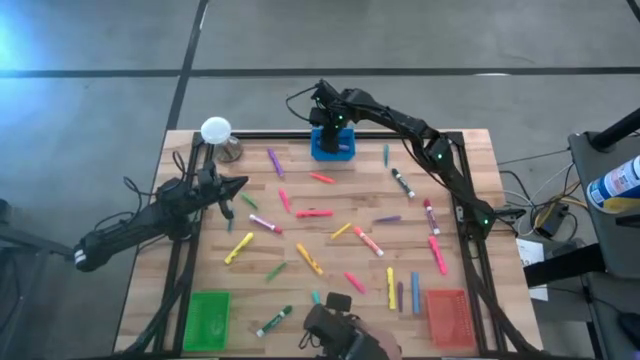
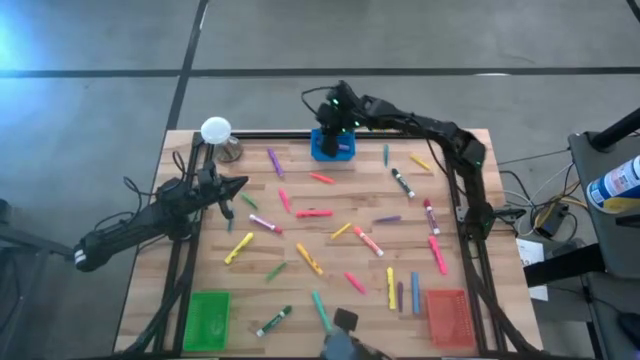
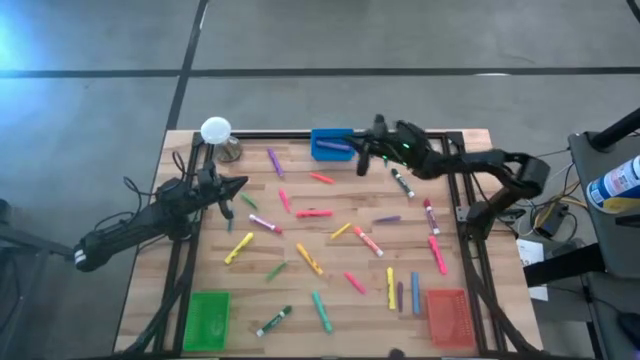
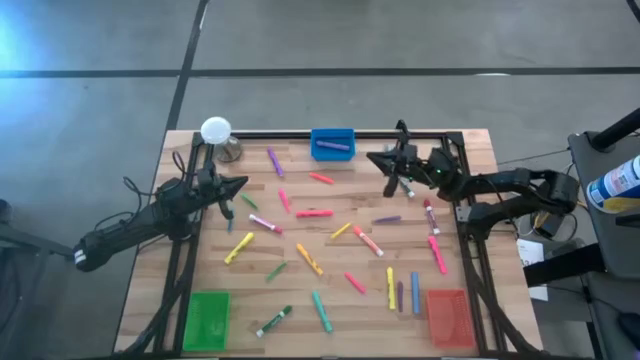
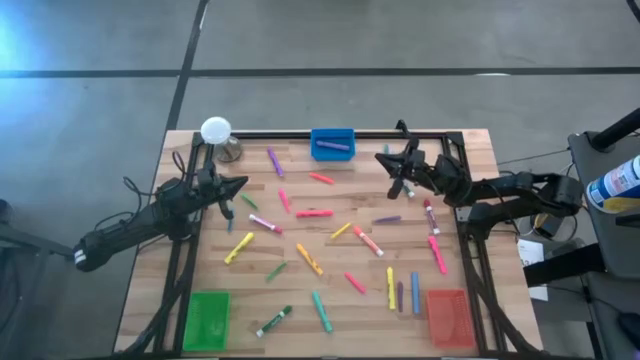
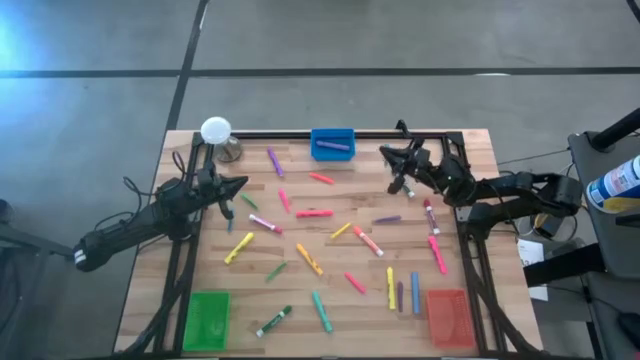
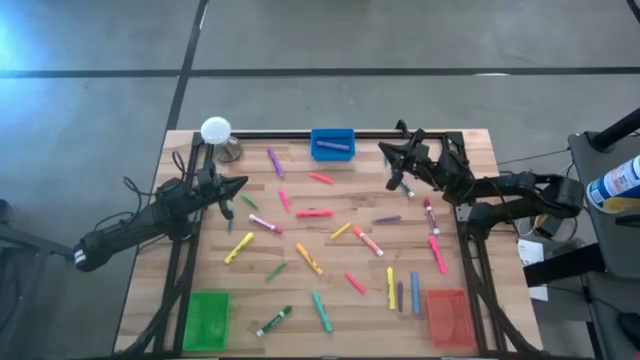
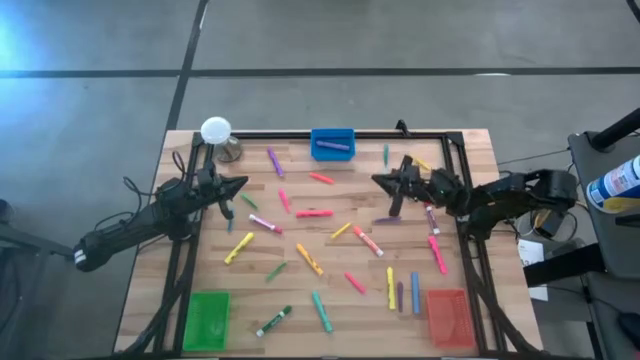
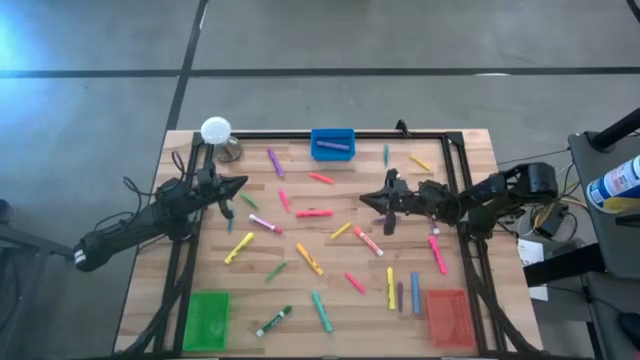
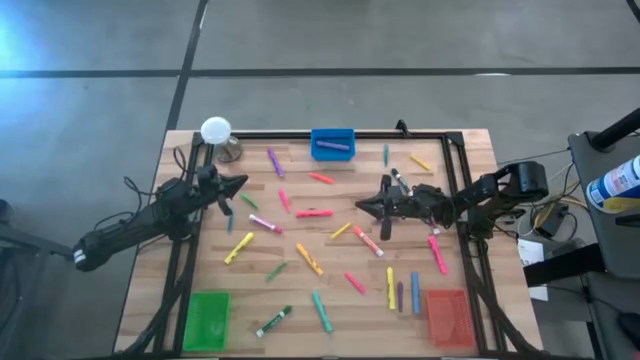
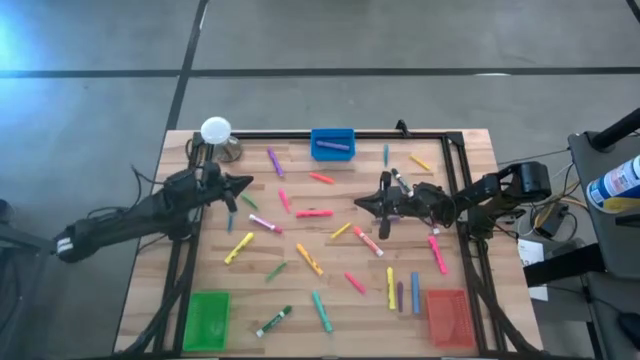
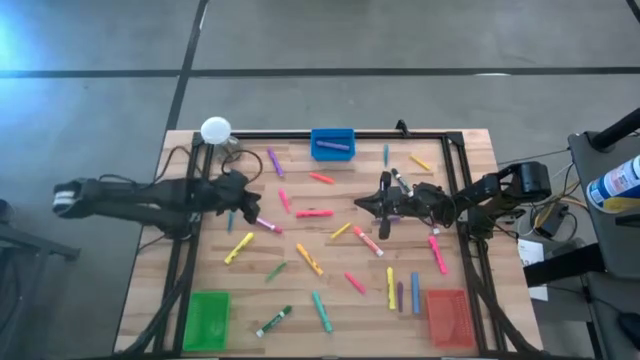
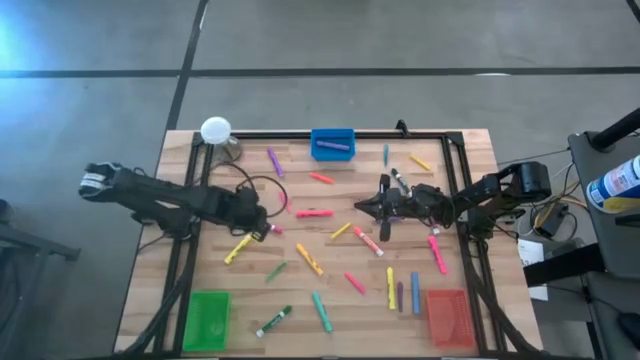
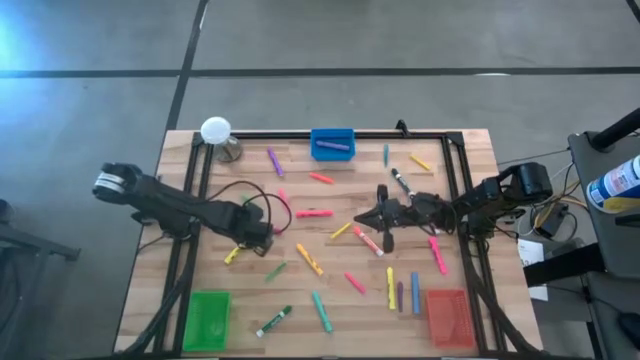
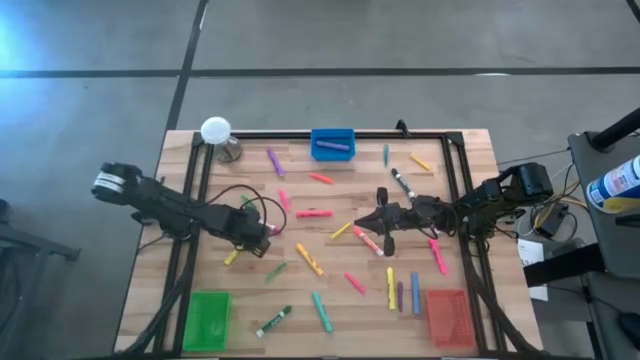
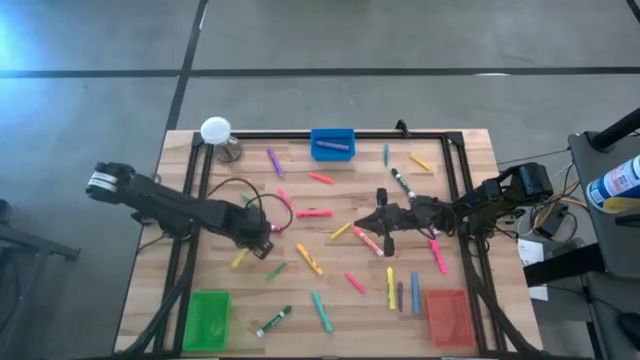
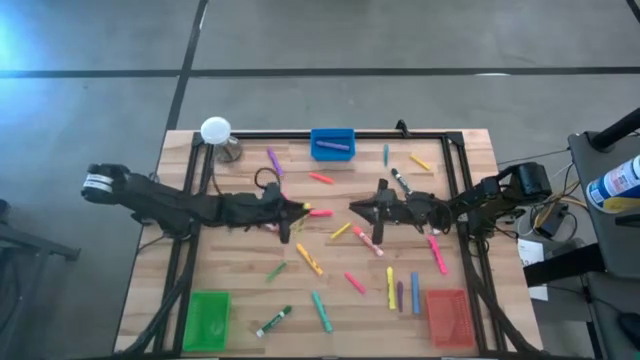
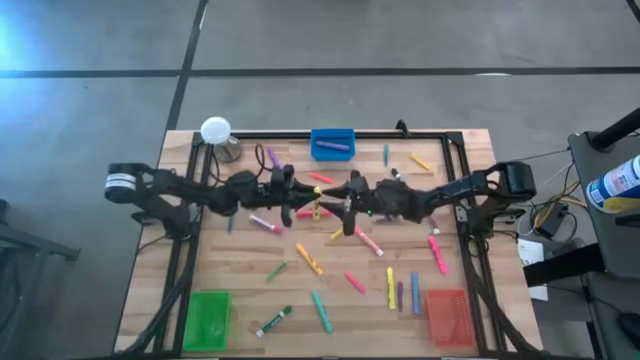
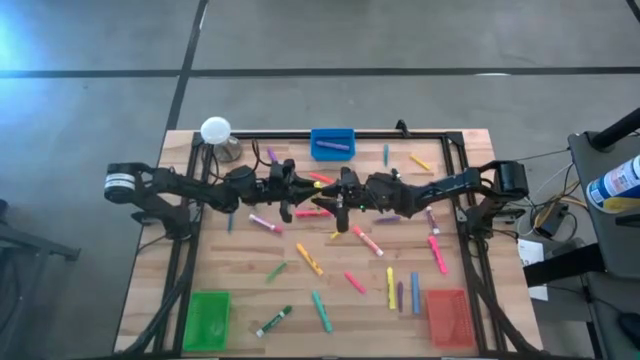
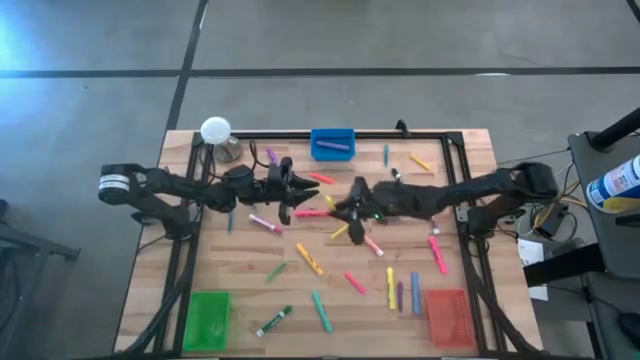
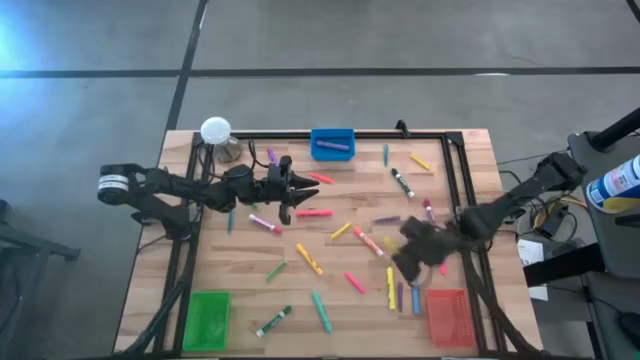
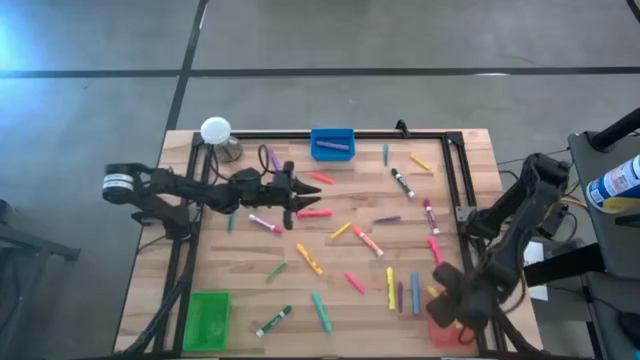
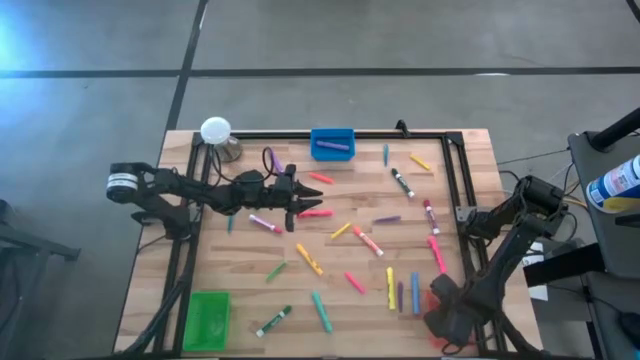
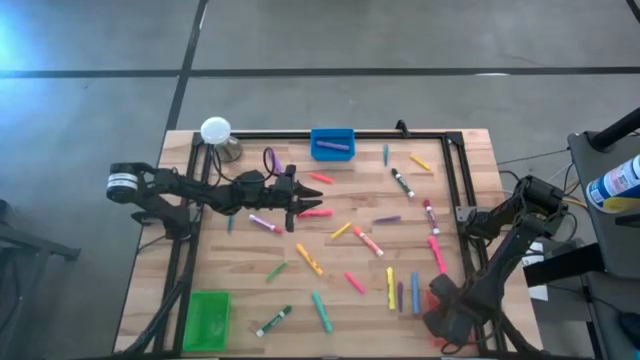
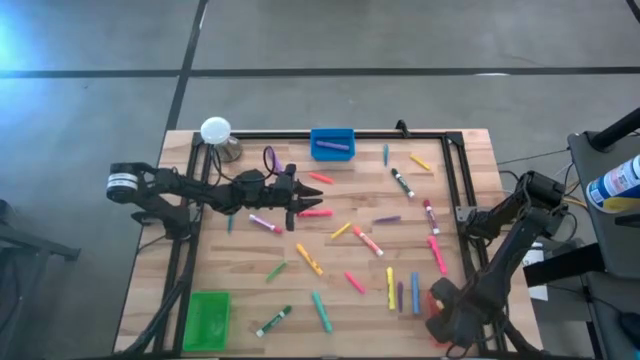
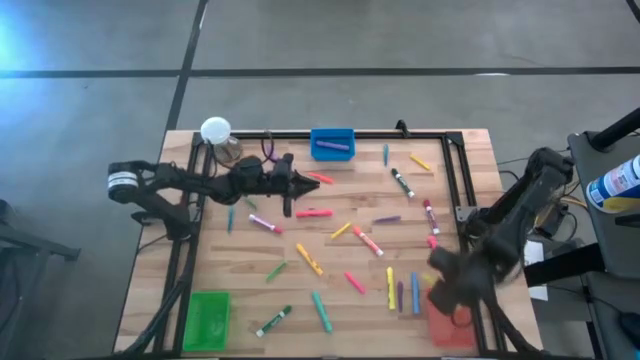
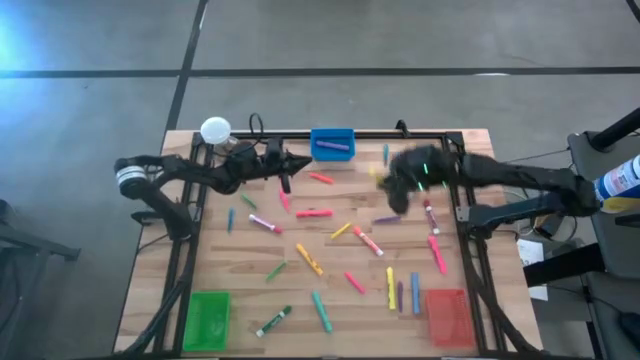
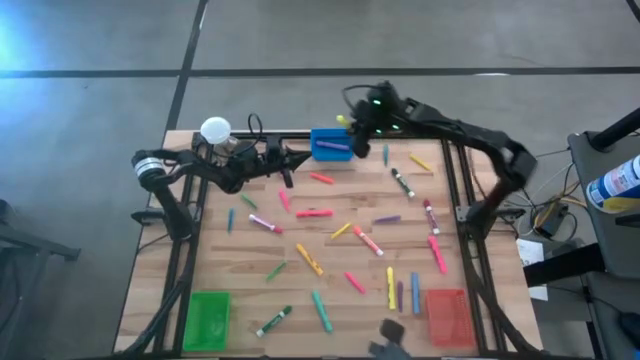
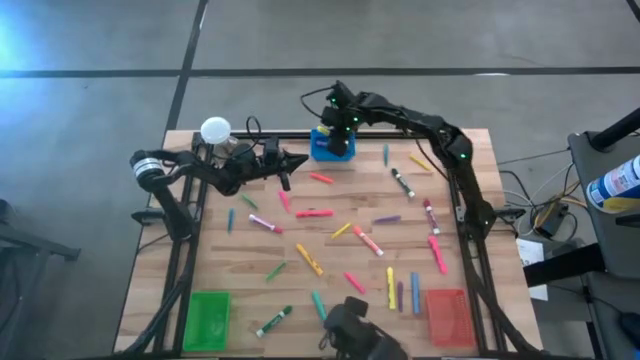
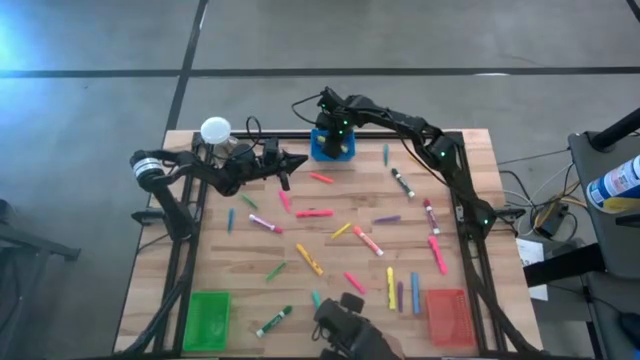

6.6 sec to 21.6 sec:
Task: Pick & Place Markers
Put the left yellow highlighter into the blue bin

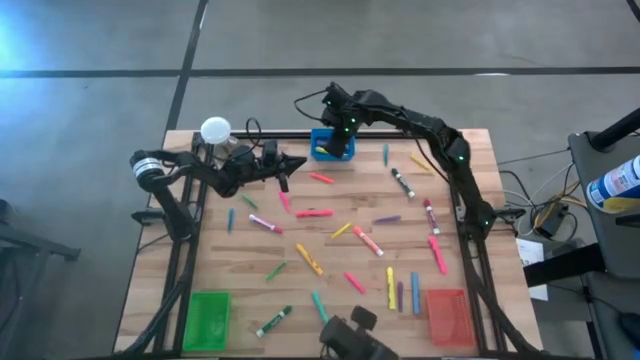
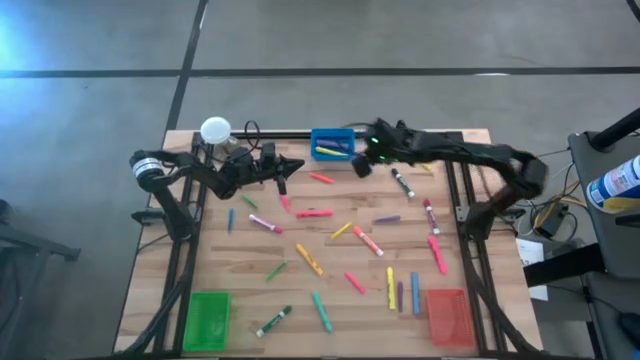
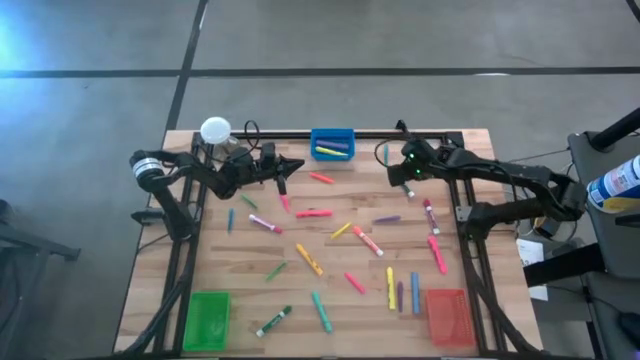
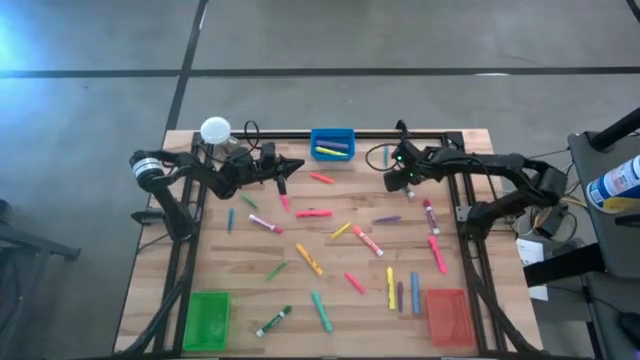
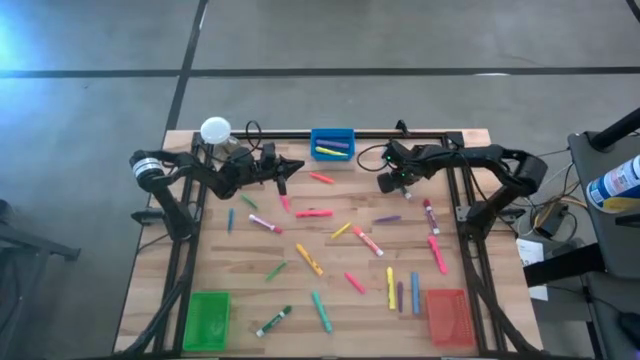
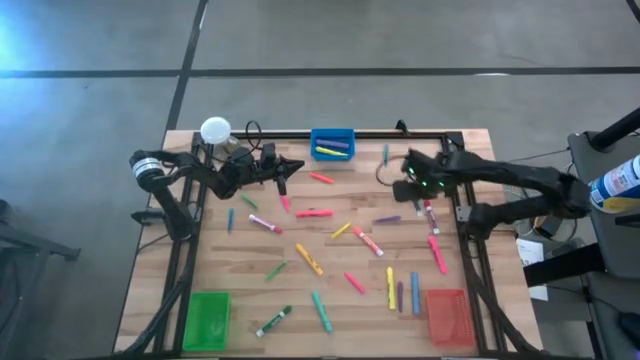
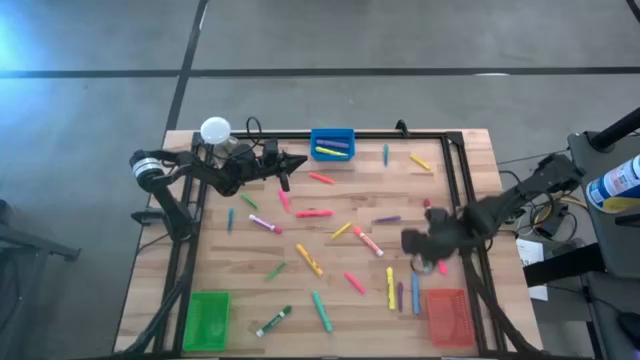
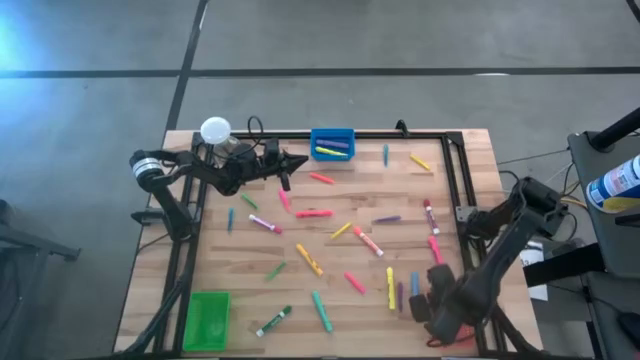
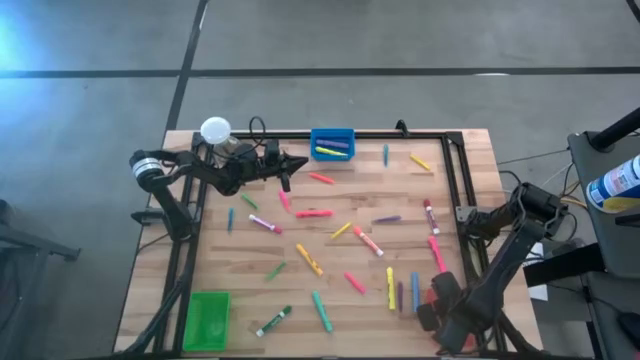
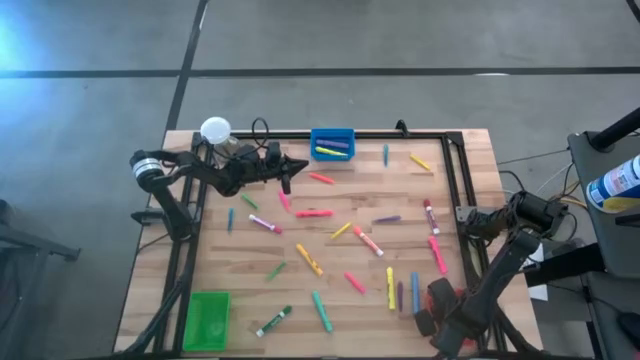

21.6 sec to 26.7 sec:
Put the top green marker into the orange bin
